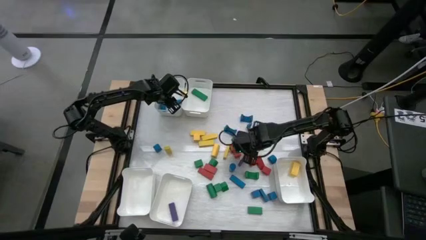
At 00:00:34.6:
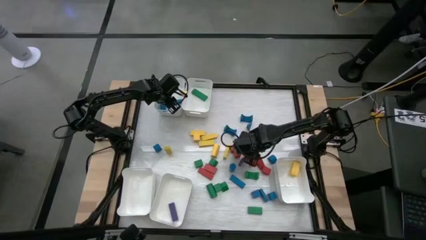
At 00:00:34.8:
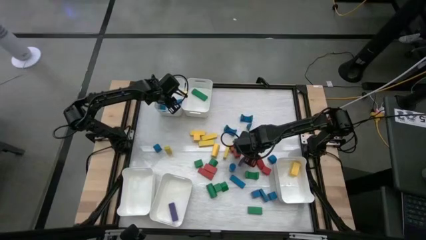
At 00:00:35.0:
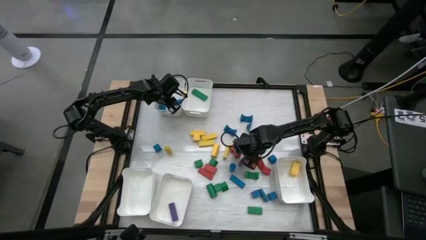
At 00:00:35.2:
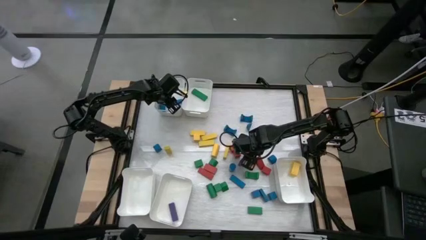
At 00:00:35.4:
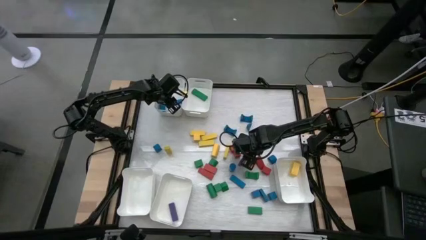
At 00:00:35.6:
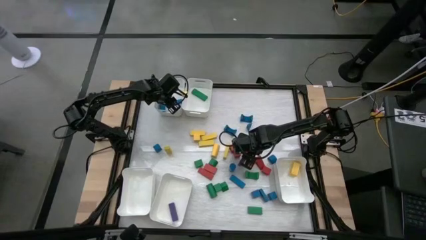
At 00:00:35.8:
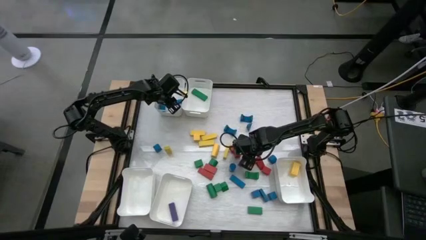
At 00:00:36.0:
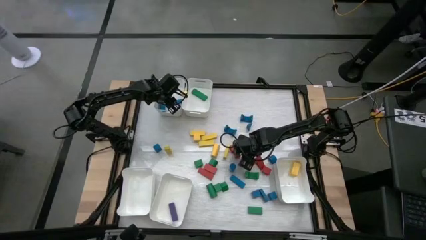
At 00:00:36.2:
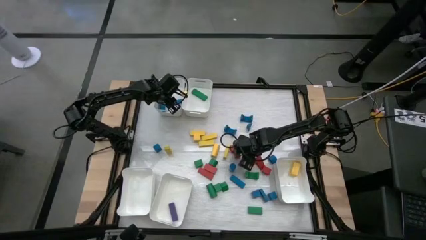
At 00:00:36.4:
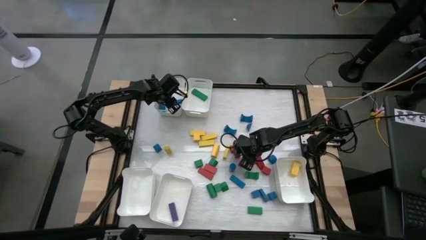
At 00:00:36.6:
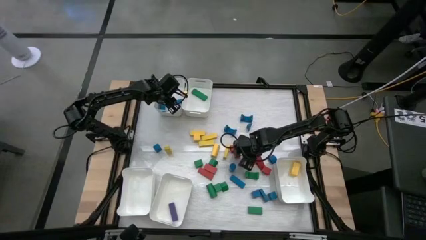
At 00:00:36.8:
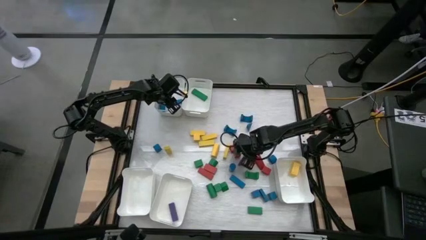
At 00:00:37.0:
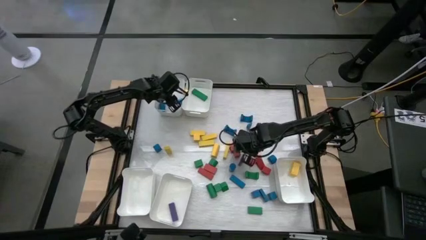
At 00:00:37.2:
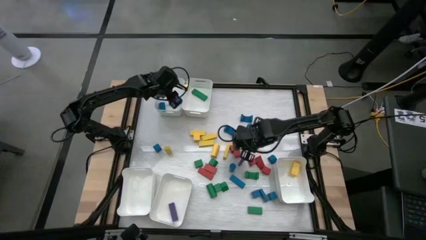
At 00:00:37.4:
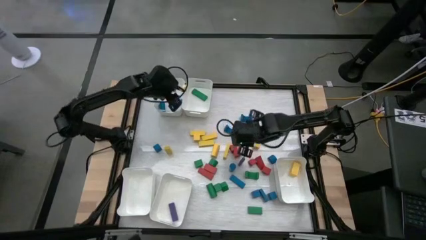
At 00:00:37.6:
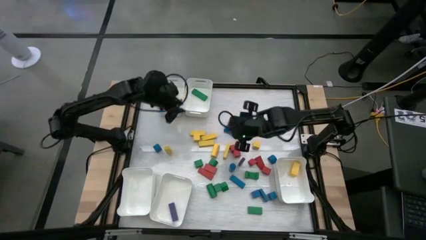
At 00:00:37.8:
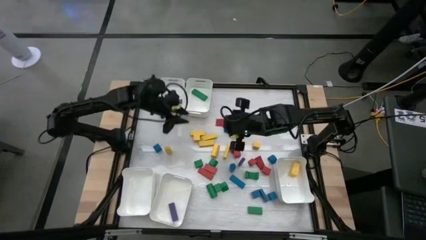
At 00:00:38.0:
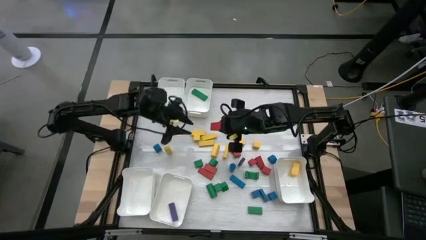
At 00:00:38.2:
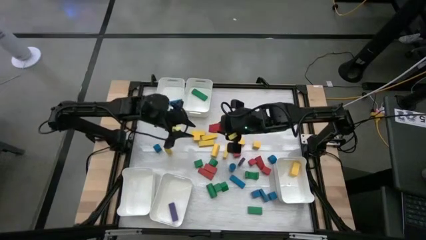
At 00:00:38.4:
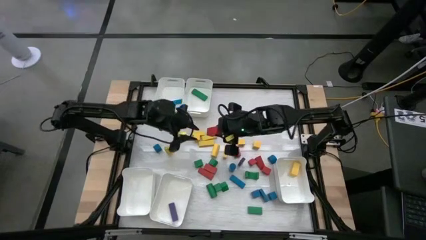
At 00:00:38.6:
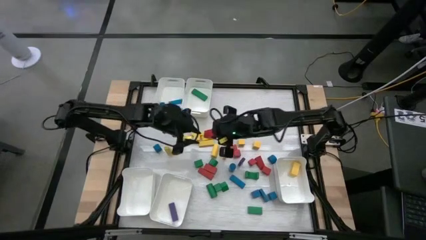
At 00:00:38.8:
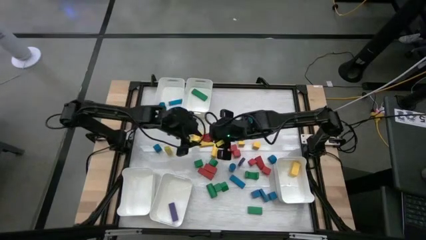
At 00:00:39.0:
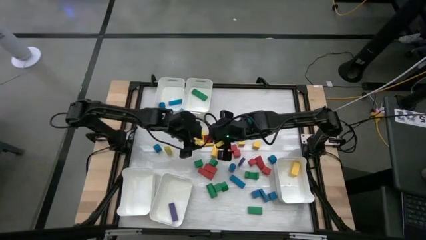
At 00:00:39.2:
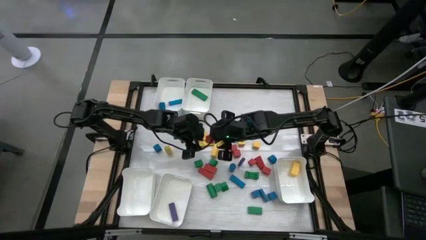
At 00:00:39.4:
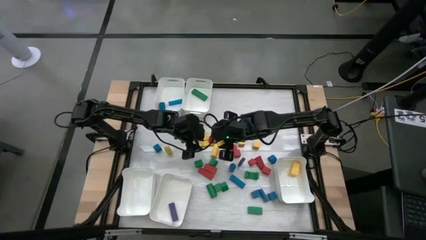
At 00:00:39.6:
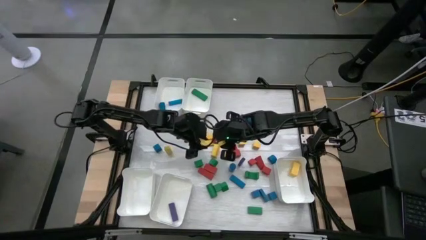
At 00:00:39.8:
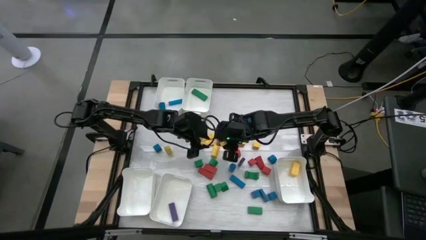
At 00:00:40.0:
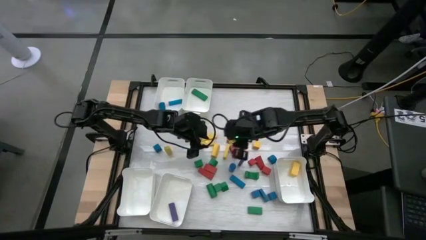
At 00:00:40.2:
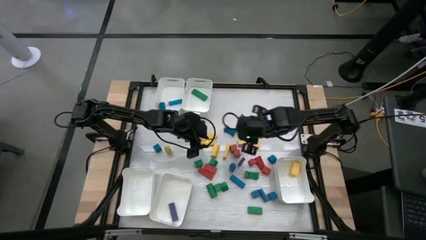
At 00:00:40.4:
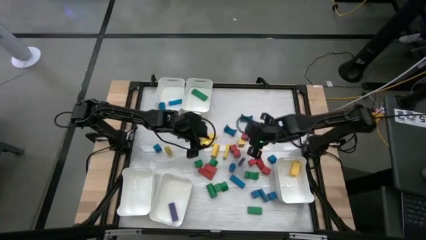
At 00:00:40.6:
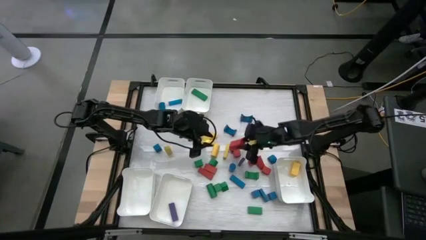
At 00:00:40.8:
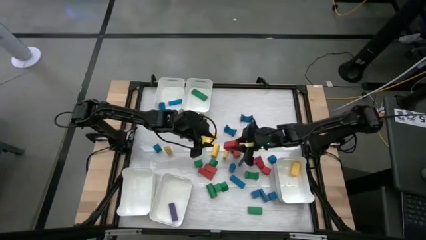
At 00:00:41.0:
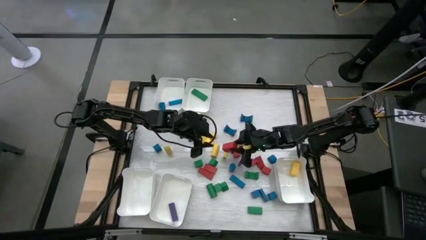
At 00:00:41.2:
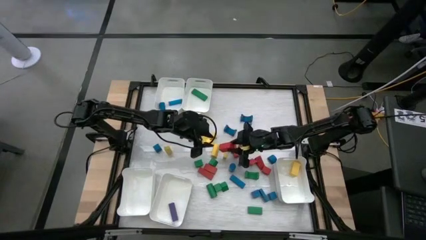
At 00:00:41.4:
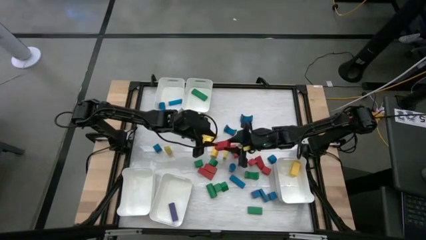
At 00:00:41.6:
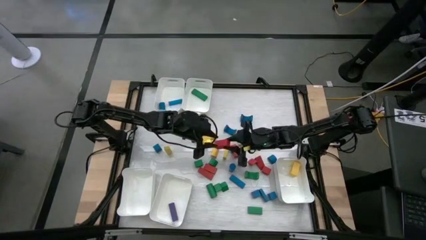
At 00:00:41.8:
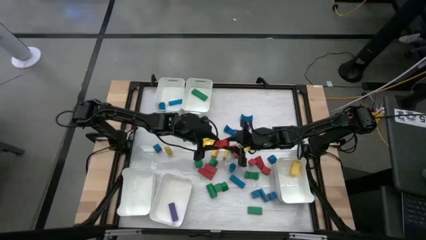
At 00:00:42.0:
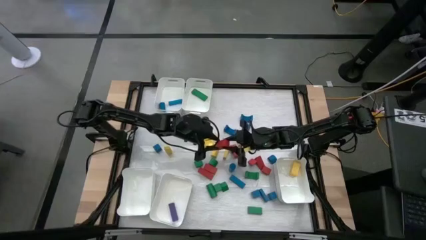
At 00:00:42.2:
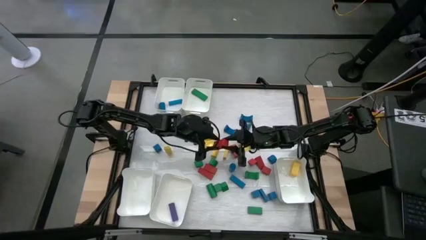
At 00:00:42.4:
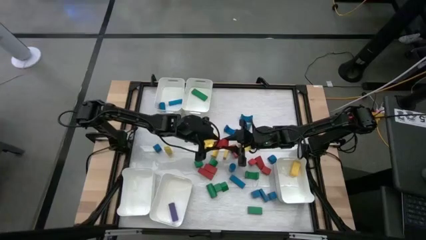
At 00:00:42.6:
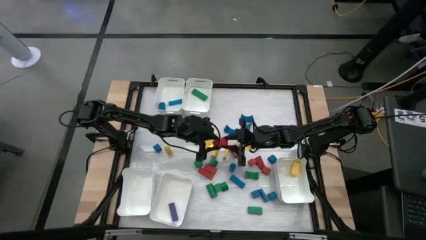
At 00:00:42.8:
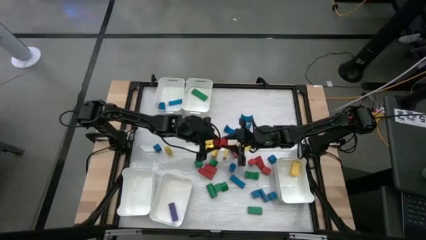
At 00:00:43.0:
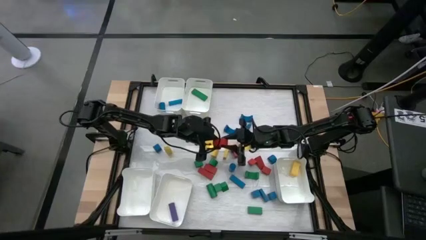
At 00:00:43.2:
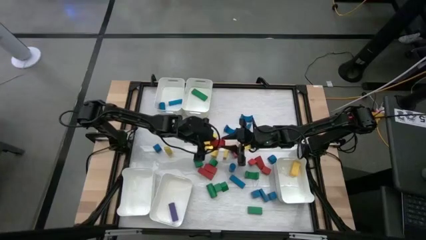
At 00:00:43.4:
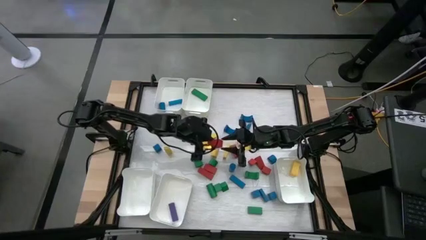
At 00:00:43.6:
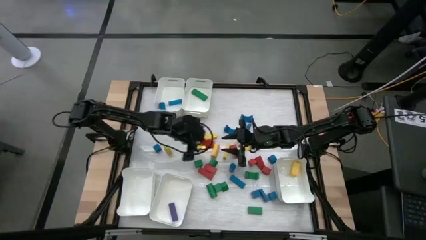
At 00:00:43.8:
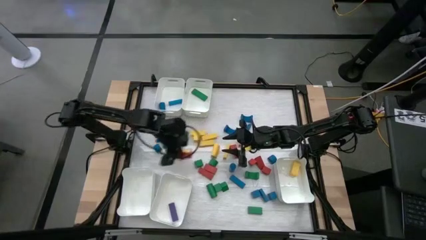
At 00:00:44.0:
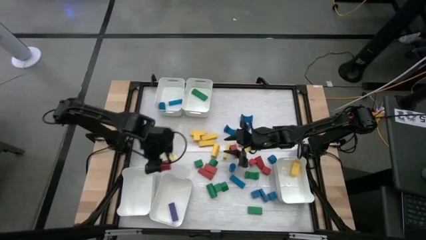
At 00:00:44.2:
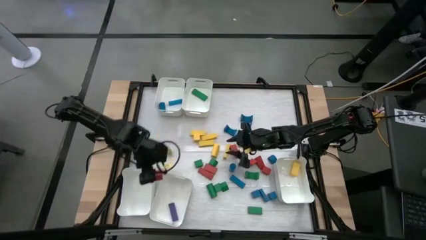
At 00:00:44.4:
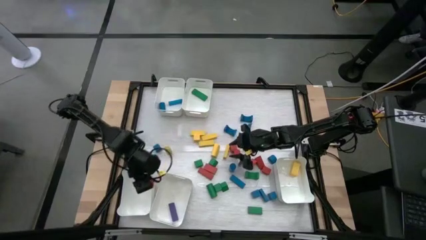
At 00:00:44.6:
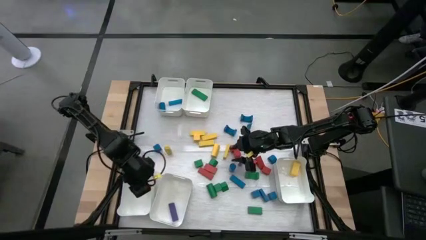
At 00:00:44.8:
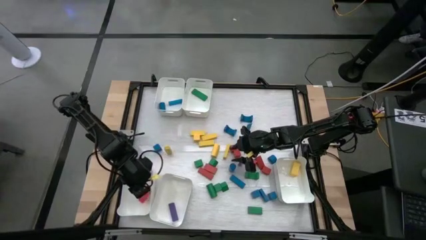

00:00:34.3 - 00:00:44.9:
Task: Sort blocks
Put the red block into the bottom left white bin

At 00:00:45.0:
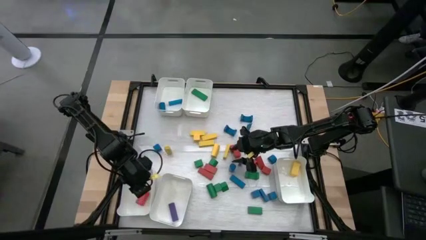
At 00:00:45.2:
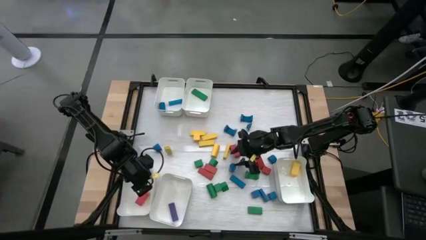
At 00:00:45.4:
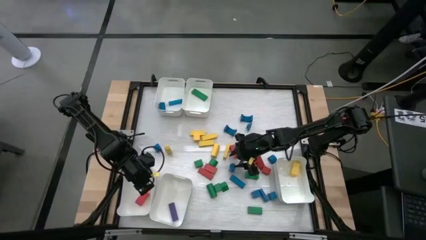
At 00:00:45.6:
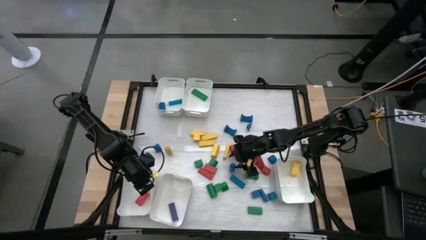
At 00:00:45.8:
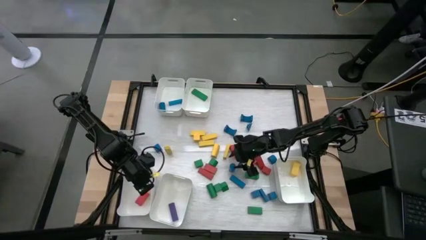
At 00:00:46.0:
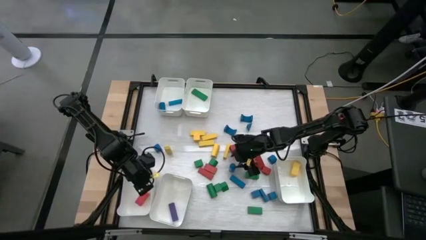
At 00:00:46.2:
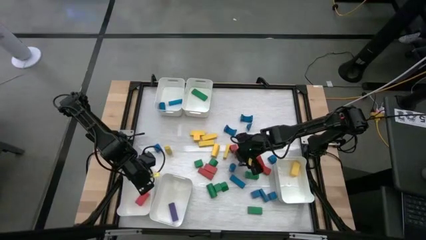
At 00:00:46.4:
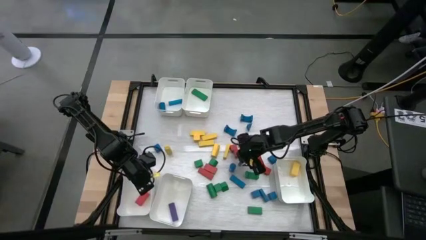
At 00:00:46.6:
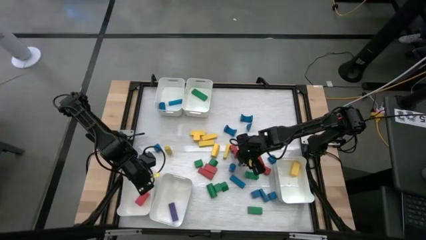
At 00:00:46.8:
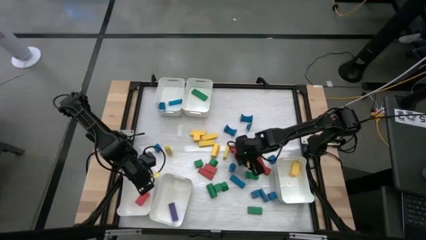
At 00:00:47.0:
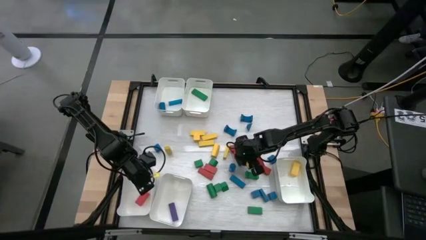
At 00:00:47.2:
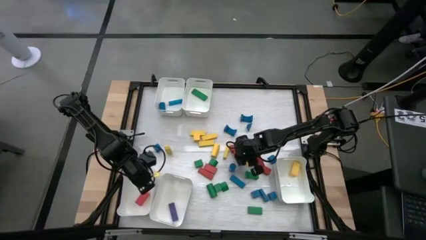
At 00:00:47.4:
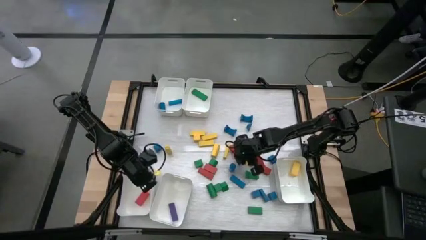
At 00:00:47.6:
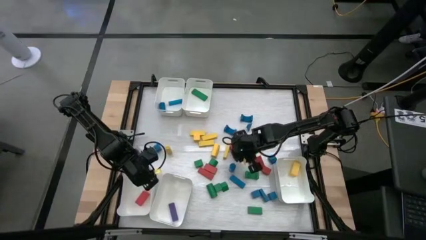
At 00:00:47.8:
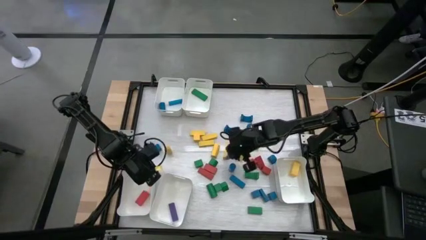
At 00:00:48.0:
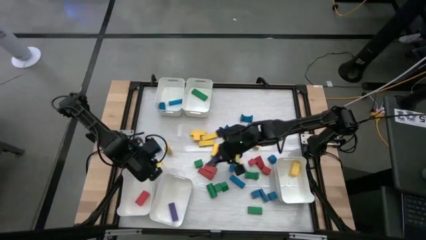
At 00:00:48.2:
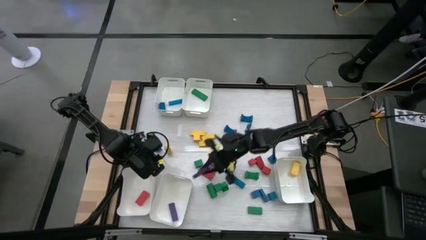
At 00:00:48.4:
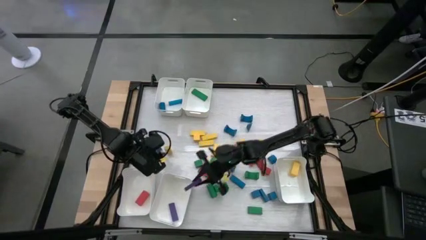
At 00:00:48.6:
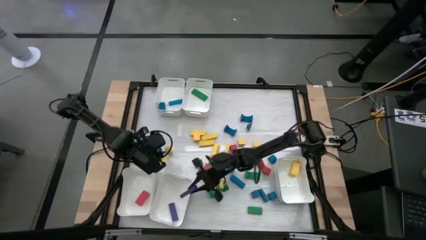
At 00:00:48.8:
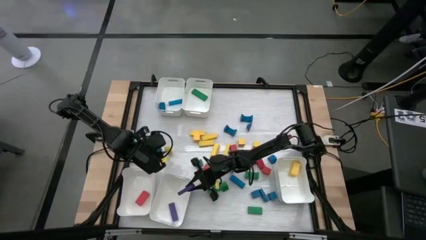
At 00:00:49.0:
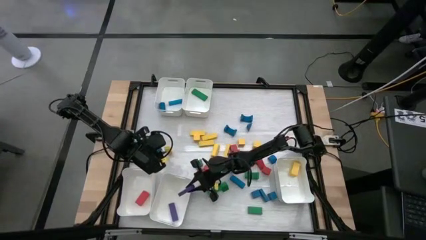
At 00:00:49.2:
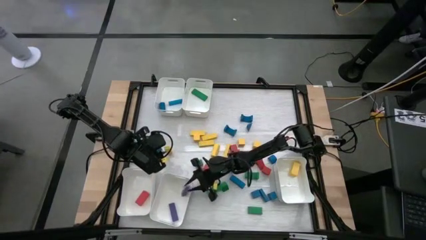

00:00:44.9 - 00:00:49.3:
Put the purple block into the middle white bin
